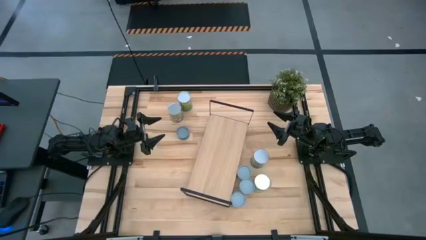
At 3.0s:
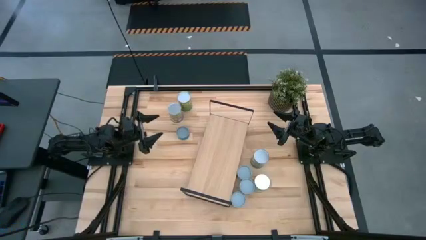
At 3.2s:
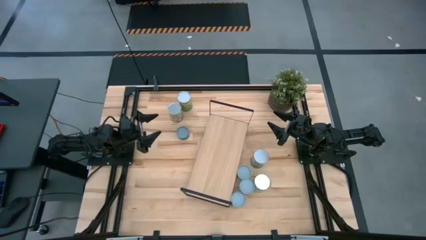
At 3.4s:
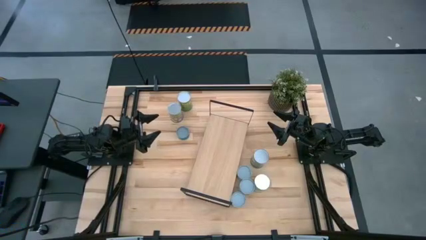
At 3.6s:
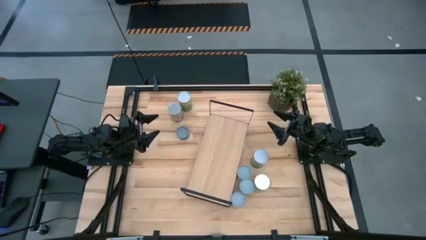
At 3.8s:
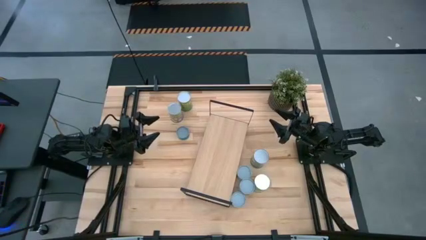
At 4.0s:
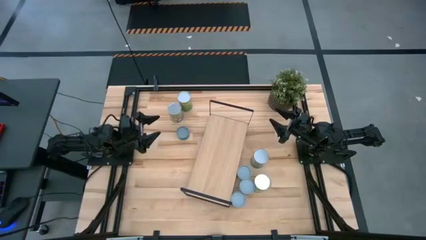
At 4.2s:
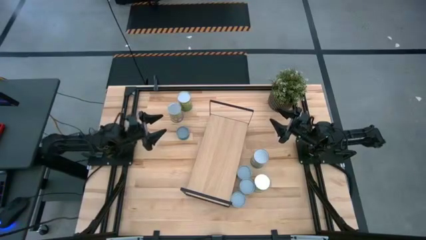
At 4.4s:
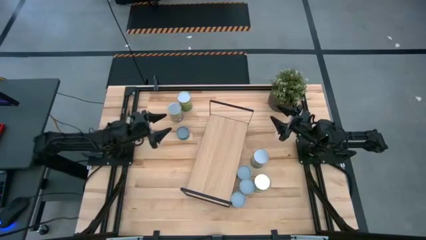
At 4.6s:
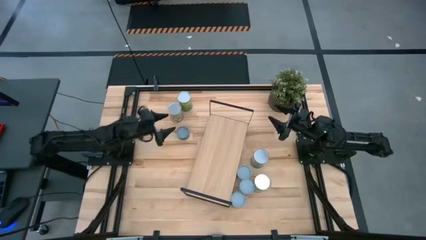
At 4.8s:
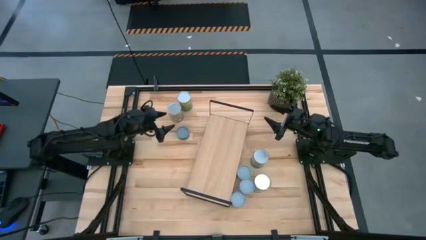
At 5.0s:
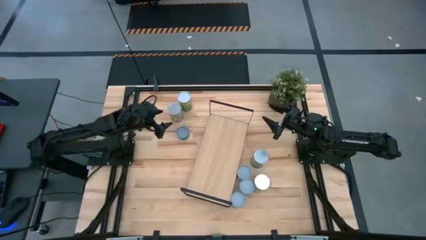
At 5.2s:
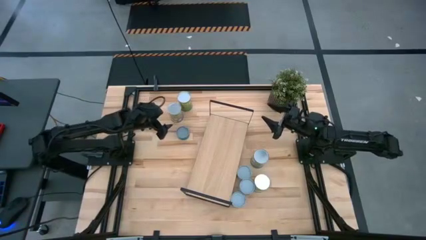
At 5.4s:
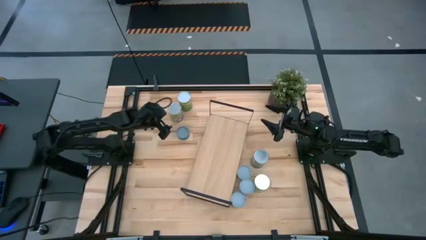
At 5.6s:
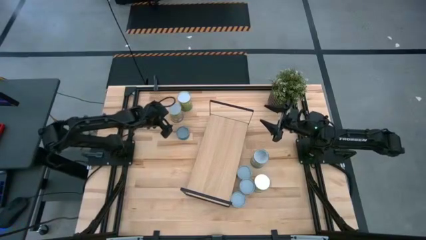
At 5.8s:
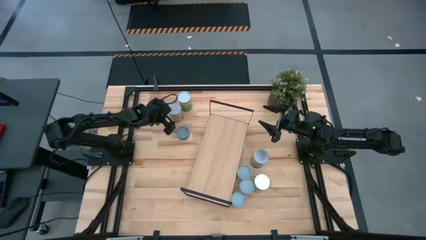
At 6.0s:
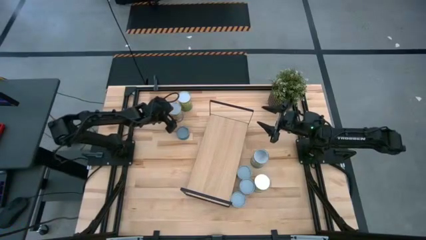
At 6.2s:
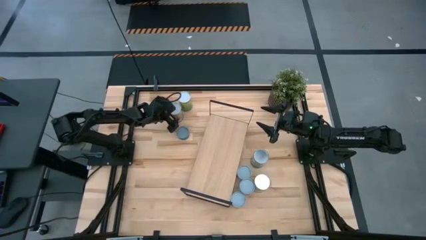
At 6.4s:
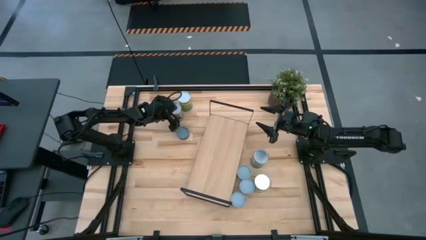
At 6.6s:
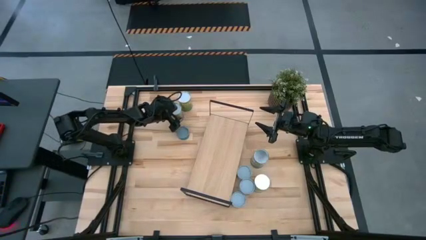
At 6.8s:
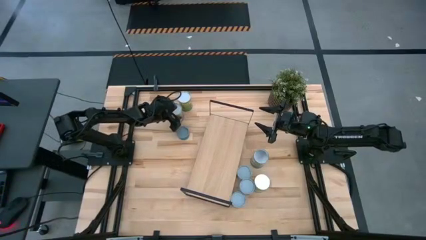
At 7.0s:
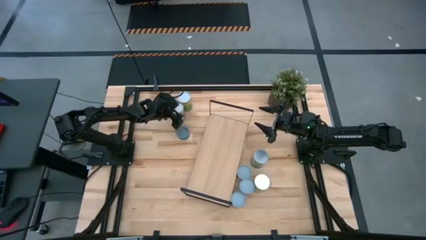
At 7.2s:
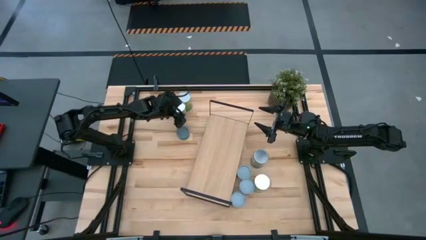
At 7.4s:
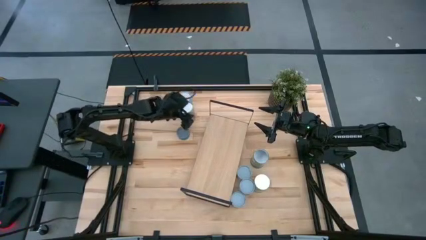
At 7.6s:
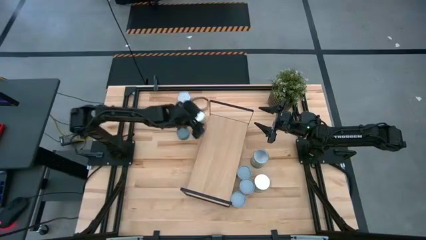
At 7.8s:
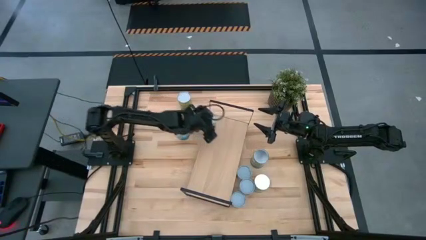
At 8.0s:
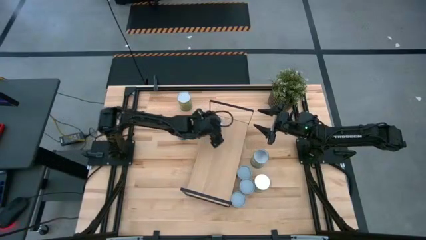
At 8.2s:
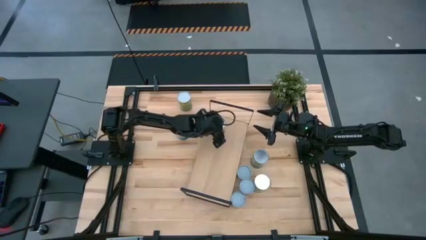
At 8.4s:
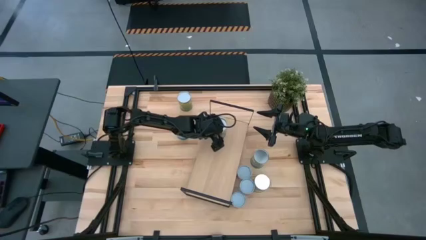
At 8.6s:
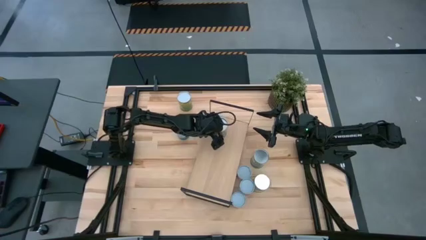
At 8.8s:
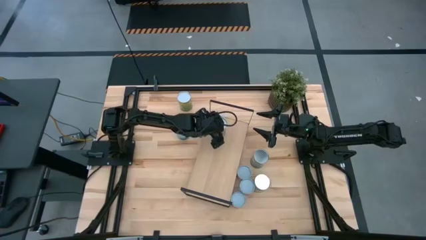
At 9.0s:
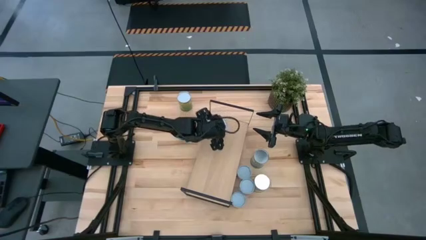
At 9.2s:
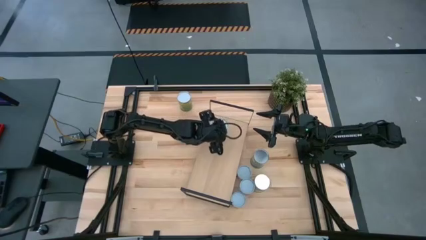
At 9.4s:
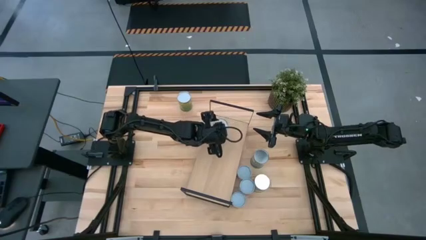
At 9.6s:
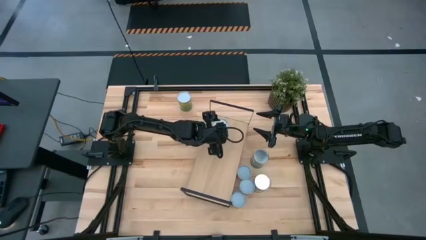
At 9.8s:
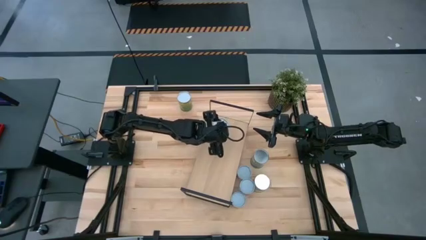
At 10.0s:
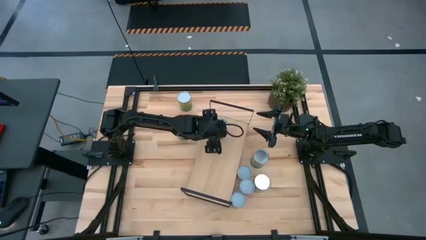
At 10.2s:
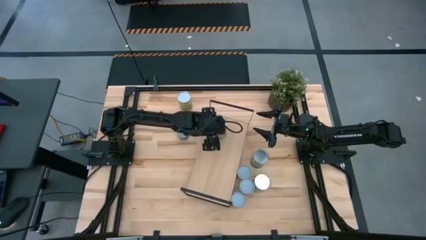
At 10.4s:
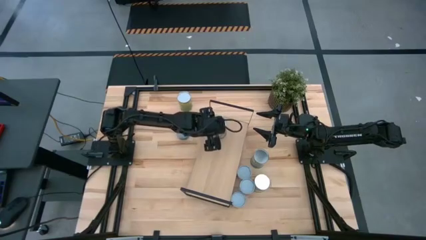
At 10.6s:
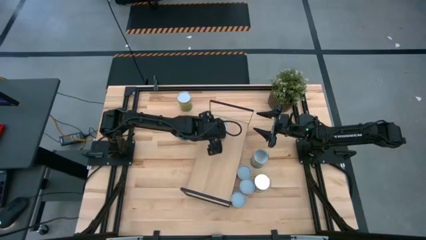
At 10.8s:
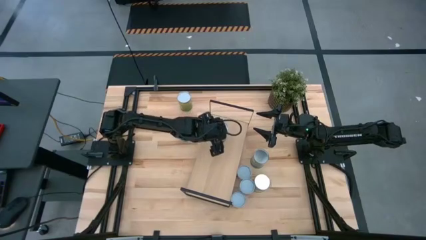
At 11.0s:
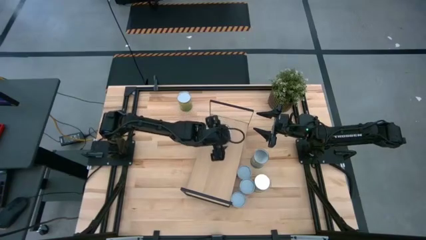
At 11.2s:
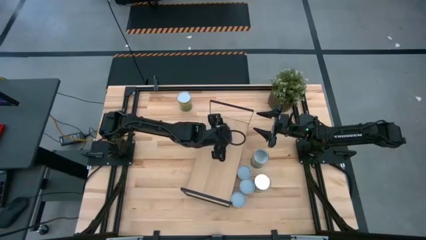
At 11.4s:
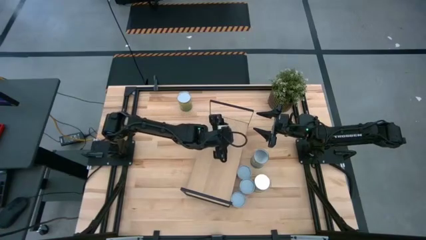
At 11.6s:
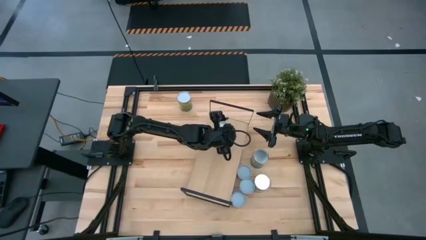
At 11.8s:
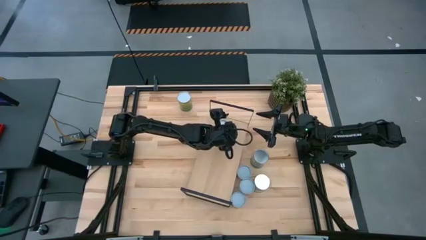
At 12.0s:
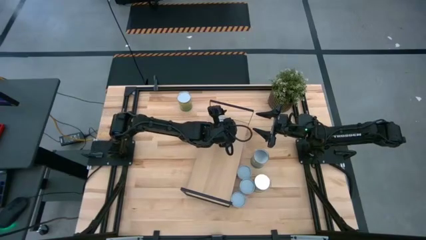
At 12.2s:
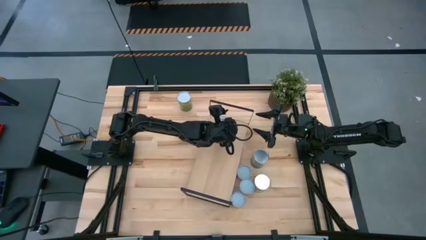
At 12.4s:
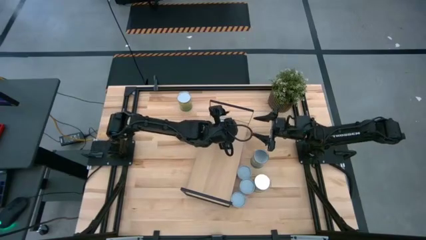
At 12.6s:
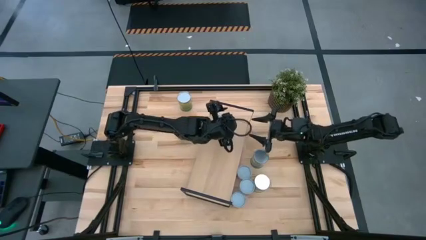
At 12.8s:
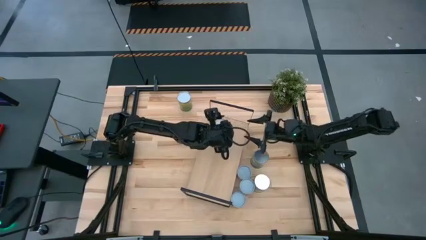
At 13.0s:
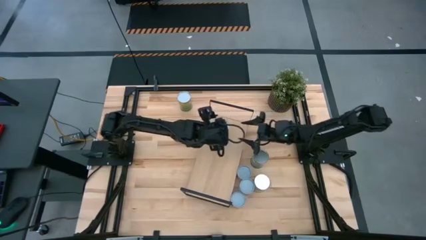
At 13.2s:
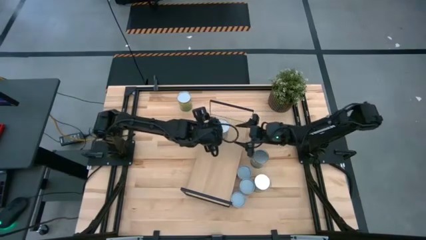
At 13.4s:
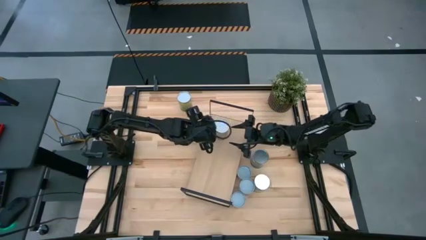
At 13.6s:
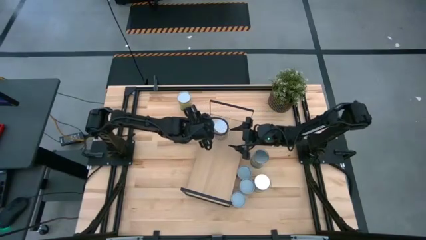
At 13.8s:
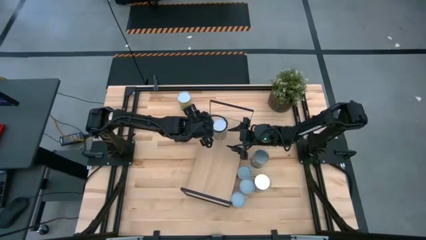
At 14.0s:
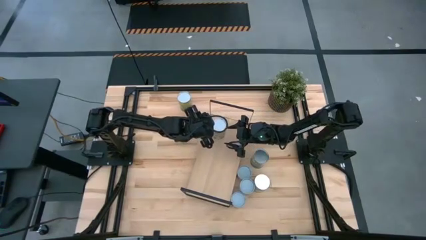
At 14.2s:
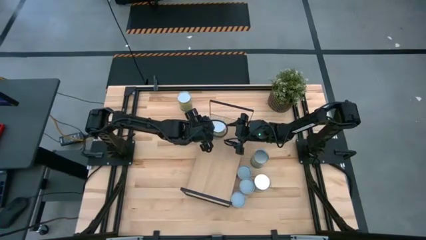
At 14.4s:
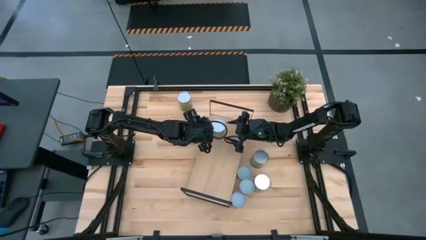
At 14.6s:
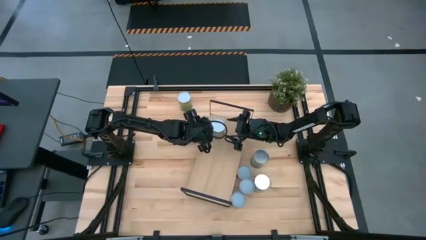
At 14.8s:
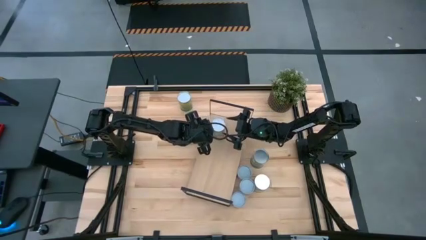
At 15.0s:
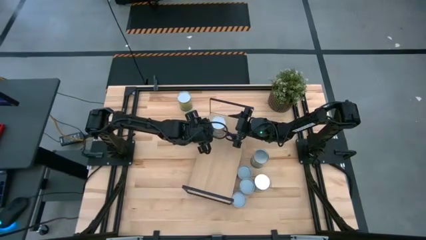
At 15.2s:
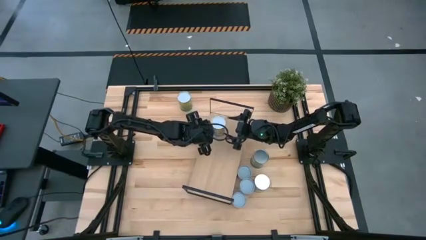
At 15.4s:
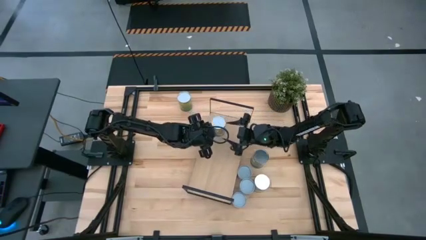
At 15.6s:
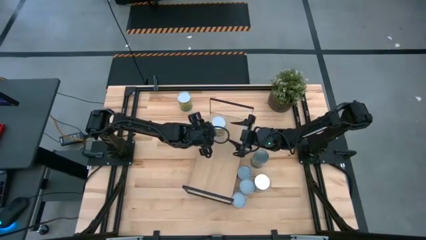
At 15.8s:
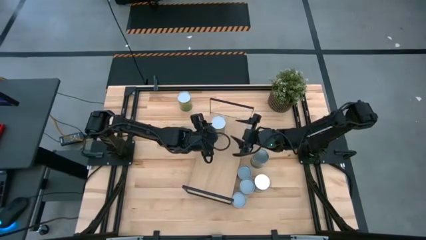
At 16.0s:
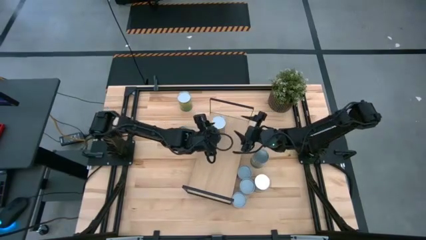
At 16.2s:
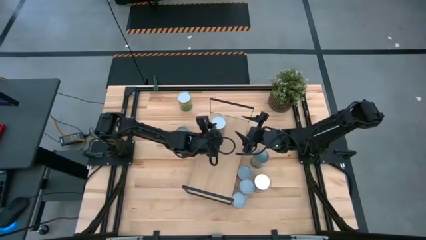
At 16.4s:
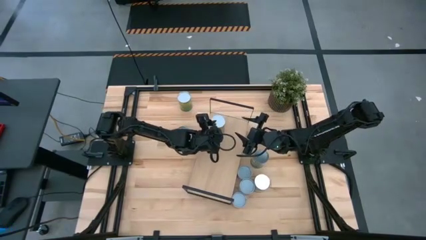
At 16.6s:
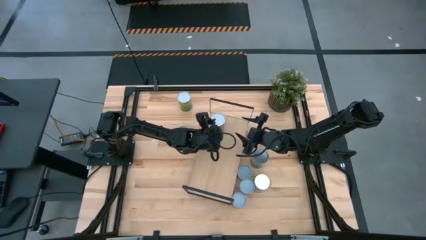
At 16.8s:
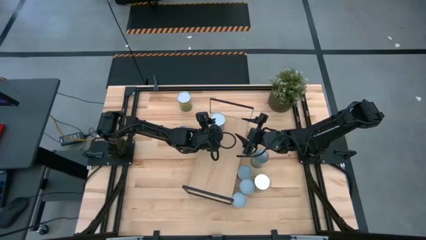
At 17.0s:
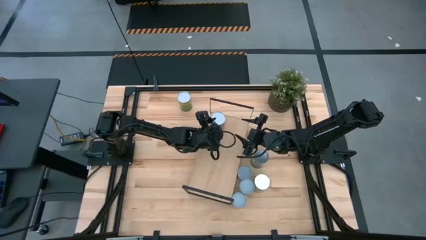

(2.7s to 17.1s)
Task: Pick and place cans onto a shelf
Put the canned peaches on the shelf
